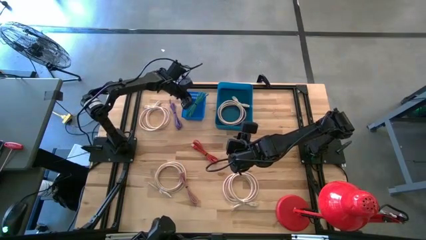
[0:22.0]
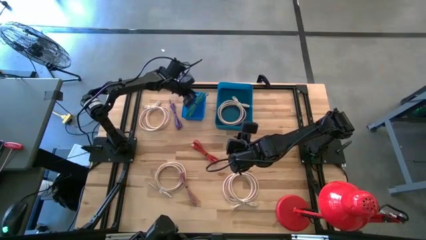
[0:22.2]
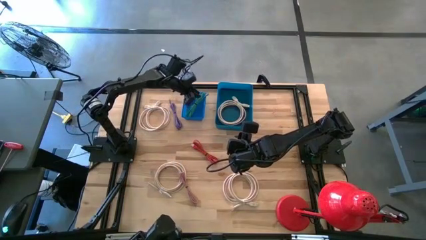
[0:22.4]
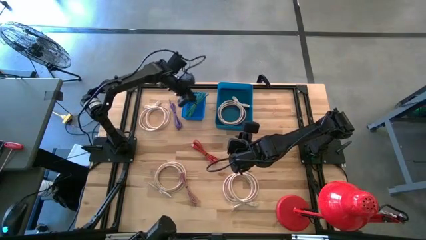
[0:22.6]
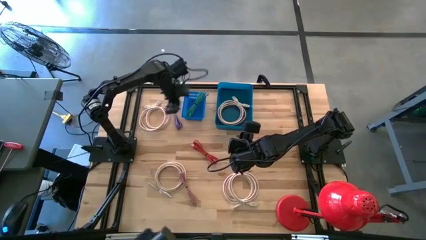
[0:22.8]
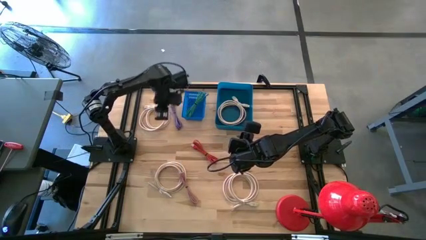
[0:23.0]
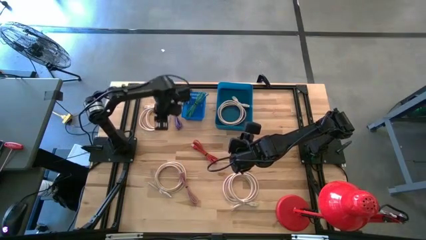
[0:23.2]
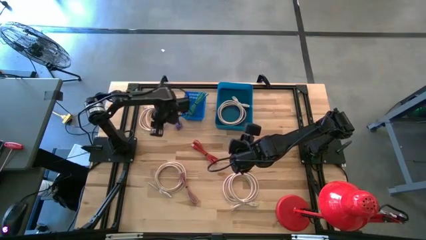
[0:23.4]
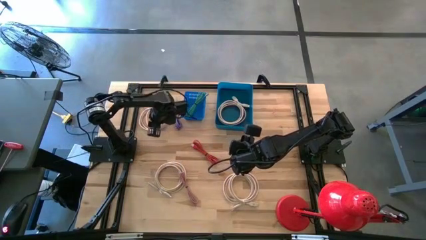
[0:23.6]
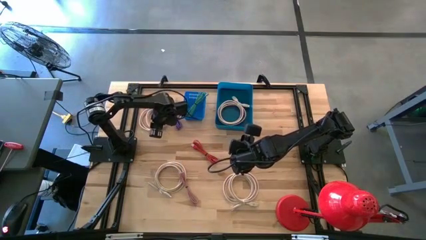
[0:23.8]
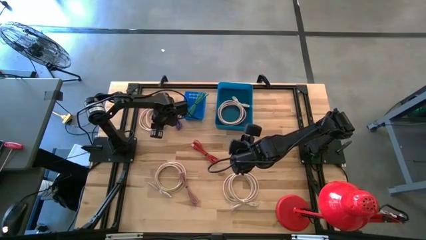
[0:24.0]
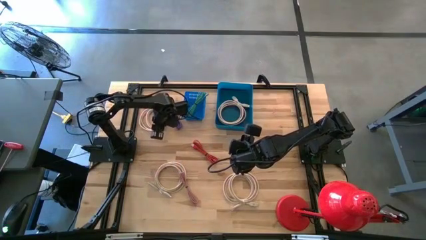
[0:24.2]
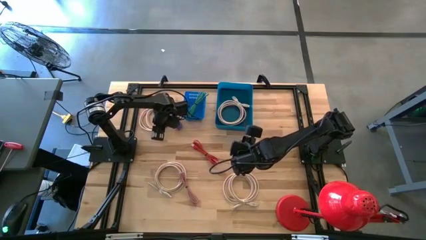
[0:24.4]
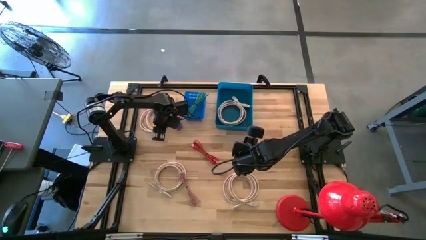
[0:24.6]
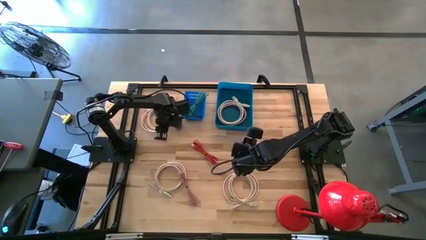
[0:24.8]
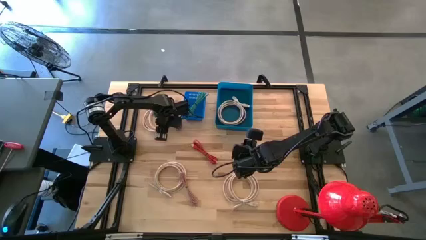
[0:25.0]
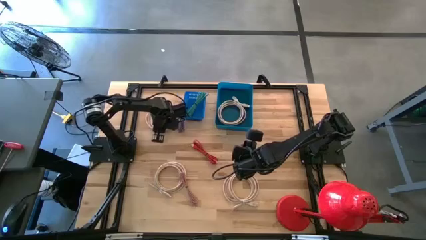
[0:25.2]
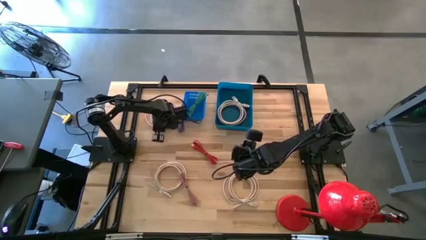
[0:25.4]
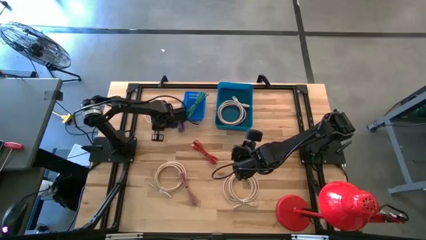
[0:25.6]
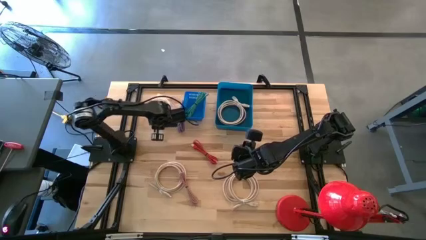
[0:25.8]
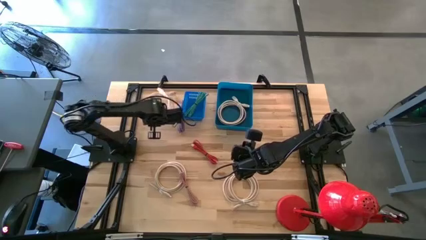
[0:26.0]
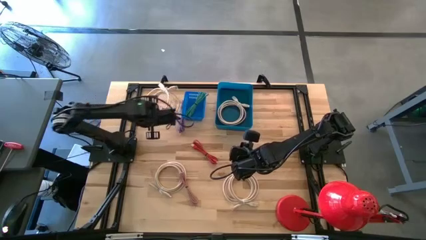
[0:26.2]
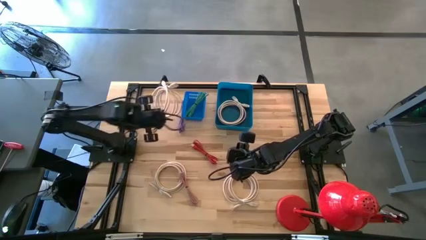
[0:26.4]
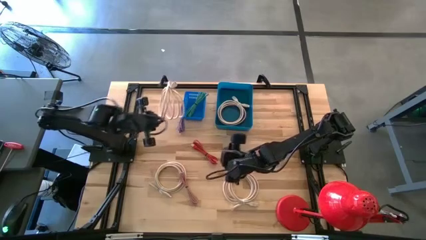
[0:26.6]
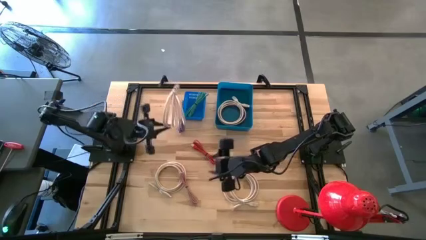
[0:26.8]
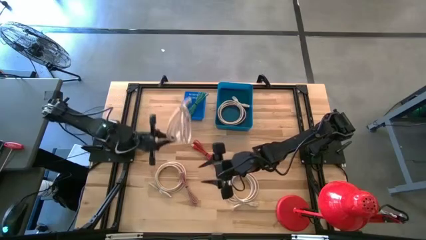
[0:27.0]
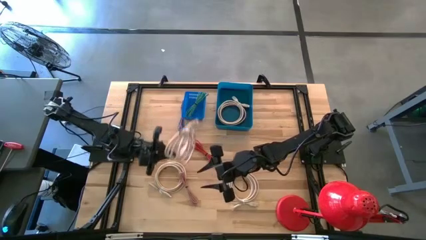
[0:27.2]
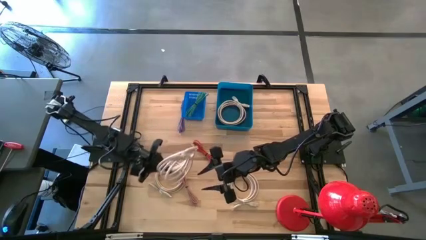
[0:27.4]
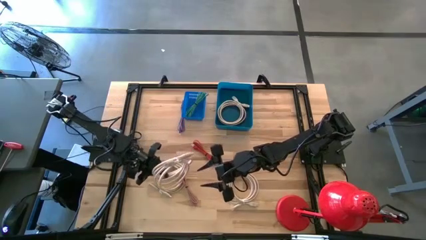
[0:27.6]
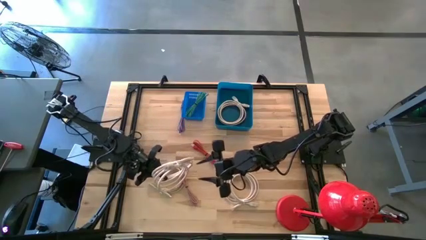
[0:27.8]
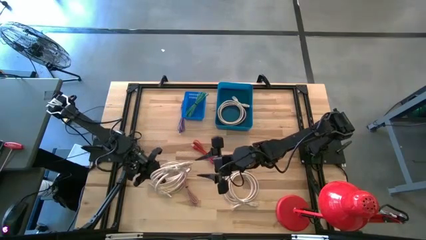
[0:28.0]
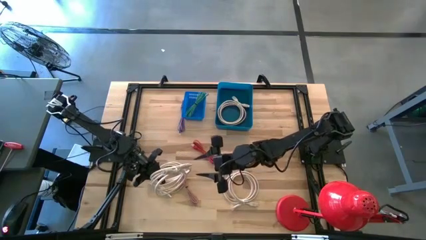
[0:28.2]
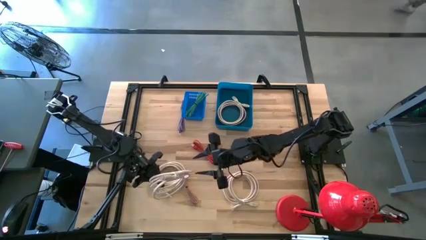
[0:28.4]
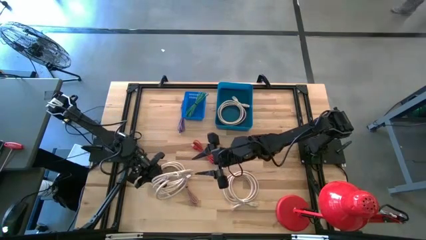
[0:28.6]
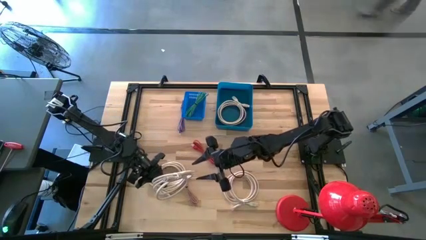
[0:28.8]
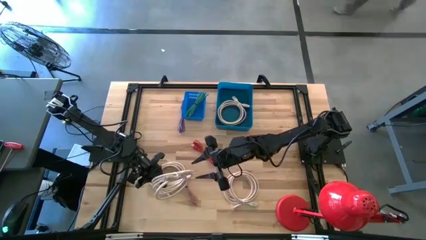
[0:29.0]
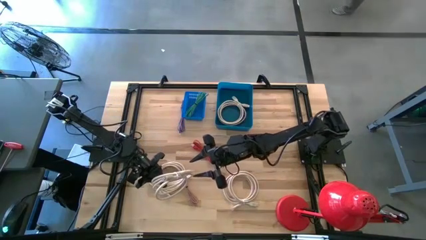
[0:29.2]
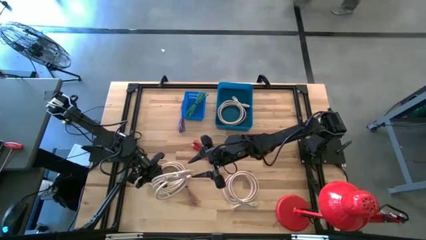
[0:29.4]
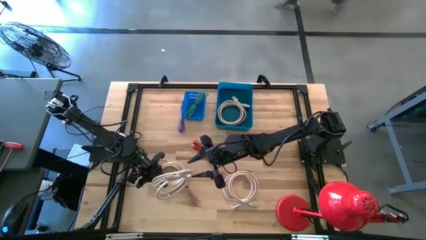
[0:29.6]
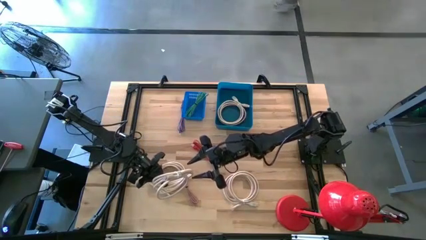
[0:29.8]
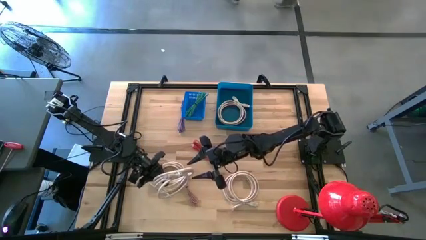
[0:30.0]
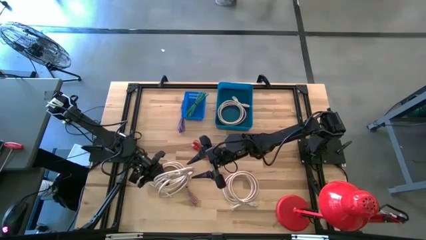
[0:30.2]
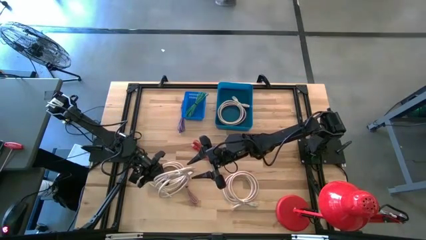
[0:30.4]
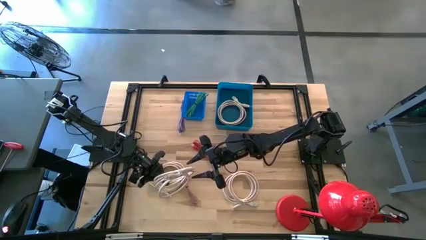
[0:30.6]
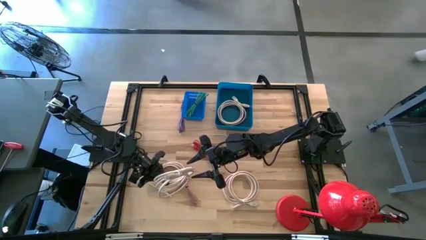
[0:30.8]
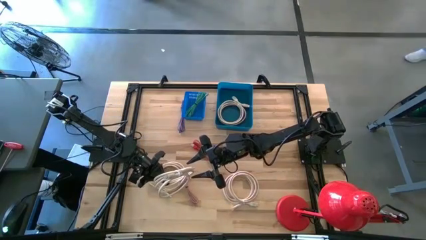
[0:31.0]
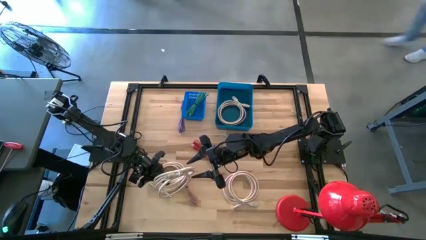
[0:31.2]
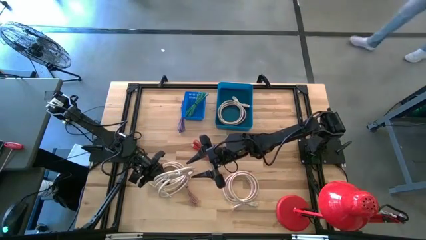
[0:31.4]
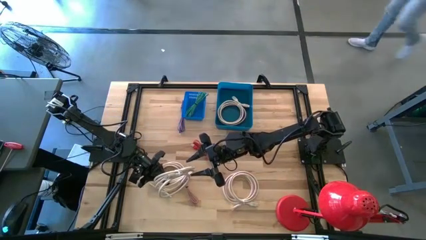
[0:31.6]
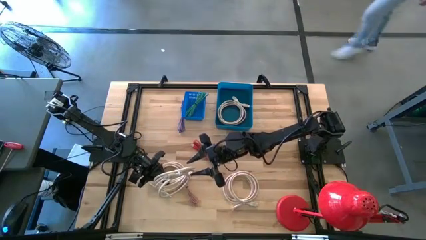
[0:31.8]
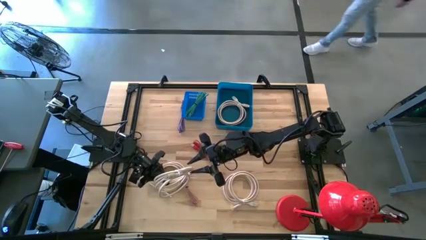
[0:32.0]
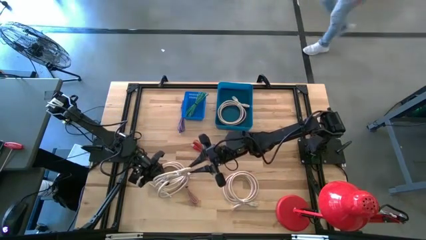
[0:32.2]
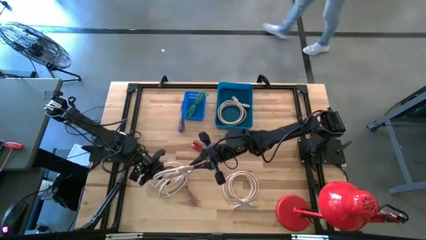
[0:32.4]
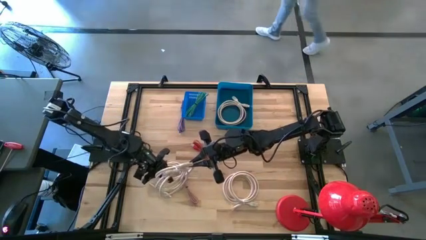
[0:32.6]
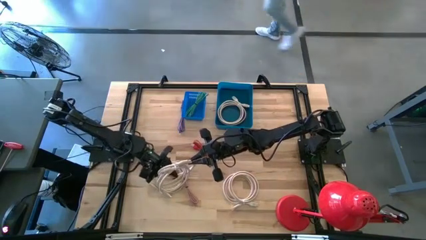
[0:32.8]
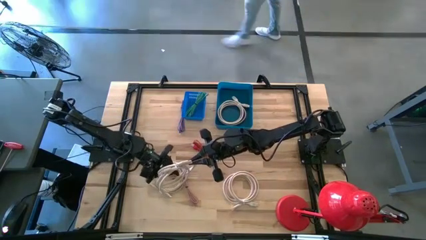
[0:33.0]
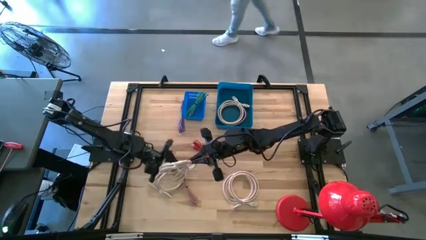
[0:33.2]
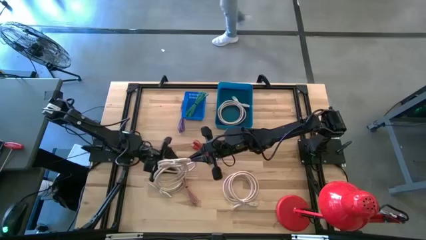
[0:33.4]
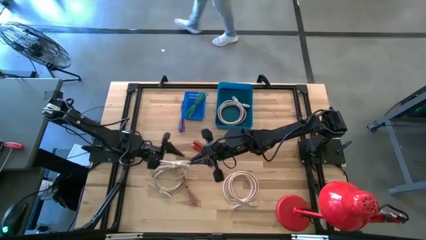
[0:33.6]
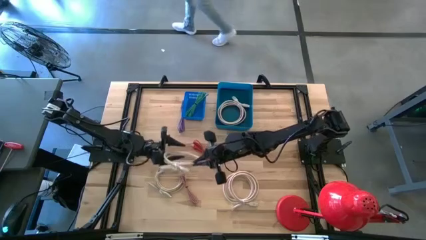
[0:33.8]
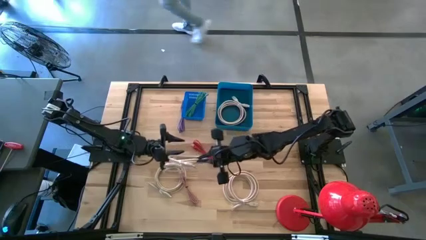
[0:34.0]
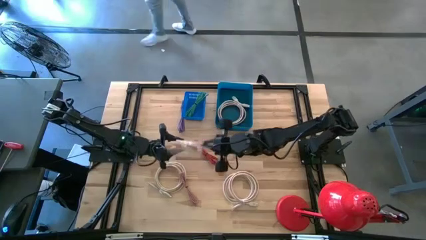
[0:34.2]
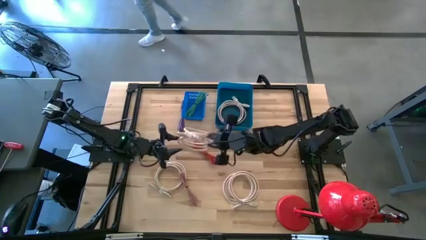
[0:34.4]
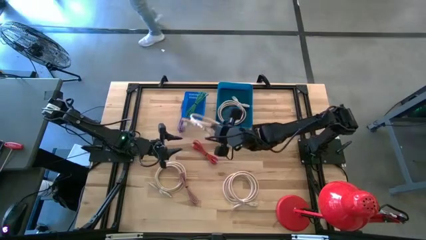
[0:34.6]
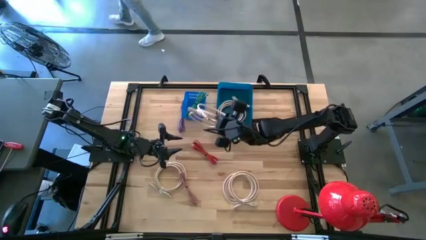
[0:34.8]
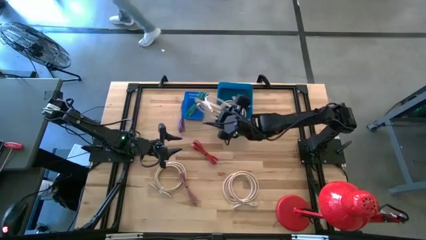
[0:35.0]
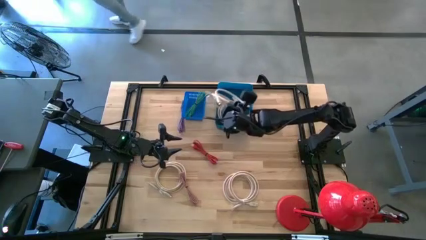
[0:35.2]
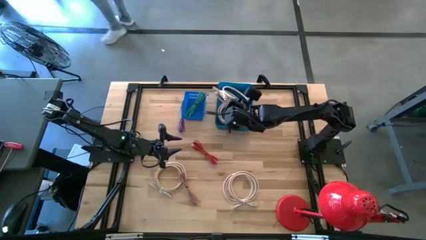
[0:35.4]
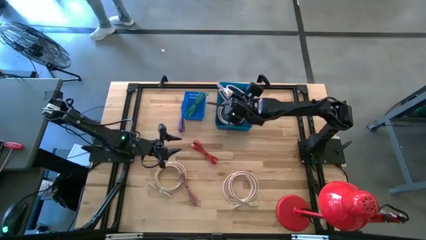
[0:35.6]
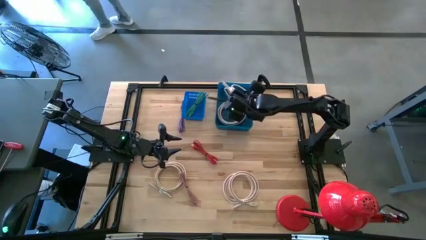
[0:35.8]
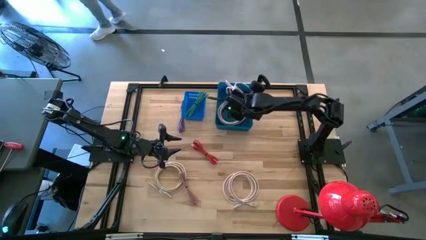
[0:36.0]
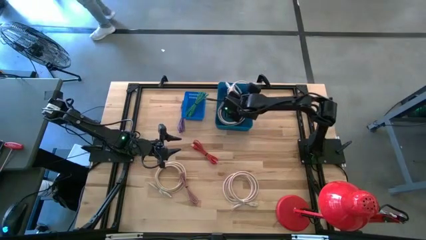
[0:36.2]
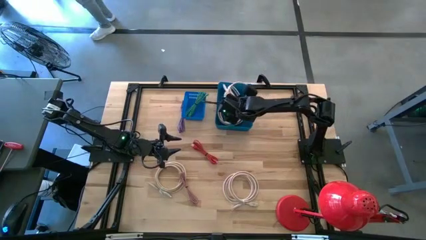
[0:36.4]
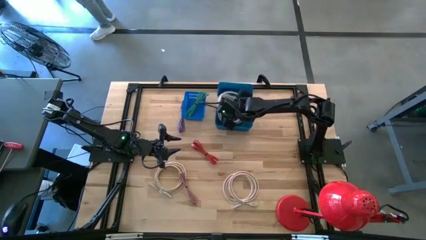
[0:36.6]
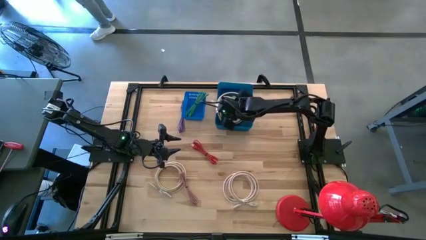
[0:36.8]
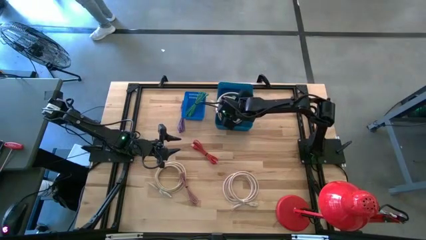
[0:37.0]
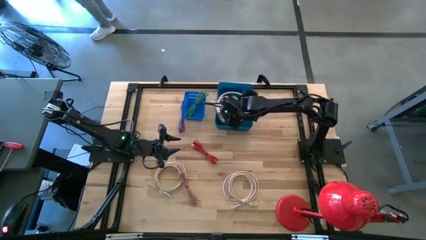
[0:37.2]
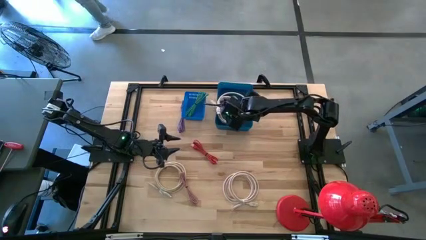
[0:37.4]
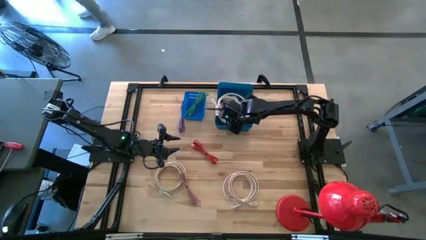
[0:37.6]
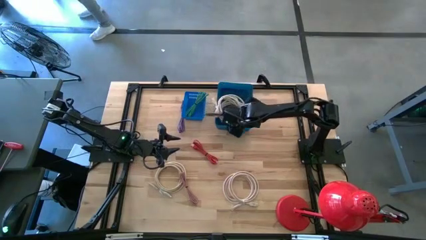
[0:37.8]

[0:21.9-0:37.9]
Task: Pick & Place USB Port
Put the white HDMI cable into the dark blue bin
